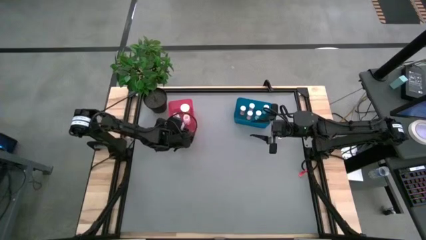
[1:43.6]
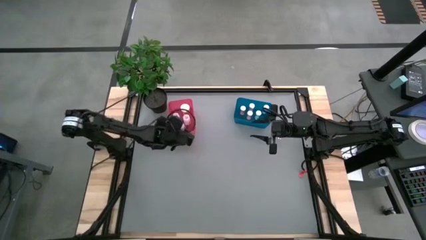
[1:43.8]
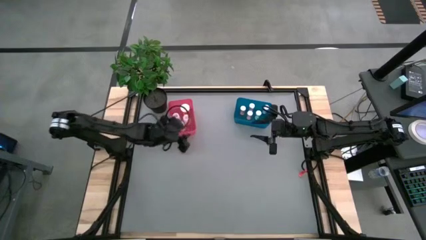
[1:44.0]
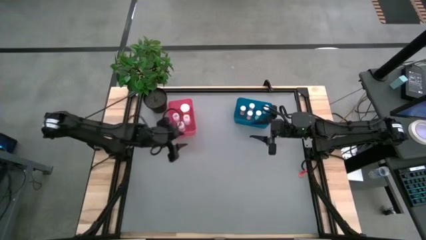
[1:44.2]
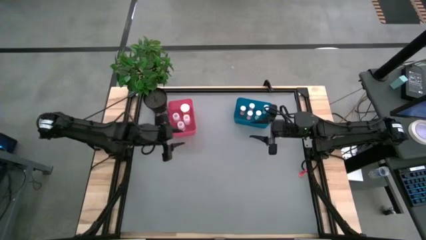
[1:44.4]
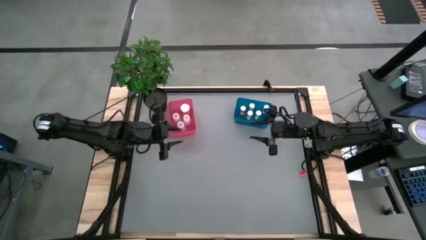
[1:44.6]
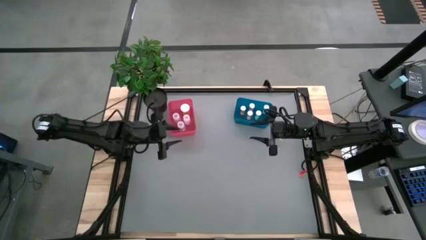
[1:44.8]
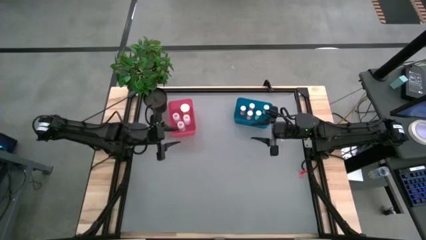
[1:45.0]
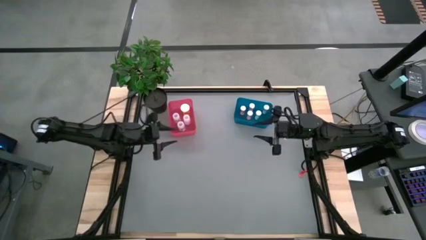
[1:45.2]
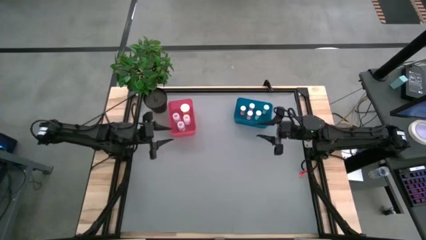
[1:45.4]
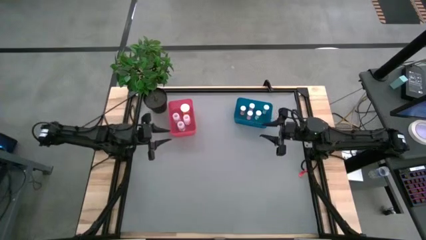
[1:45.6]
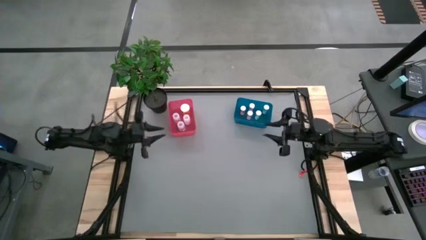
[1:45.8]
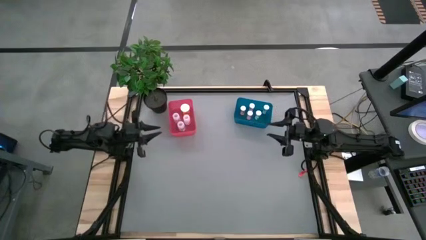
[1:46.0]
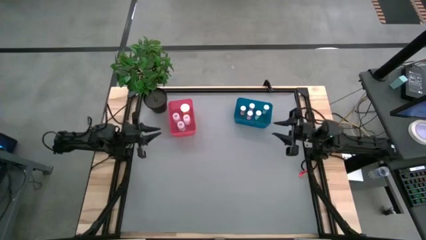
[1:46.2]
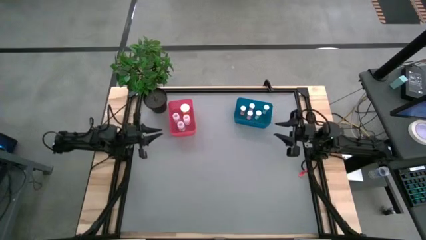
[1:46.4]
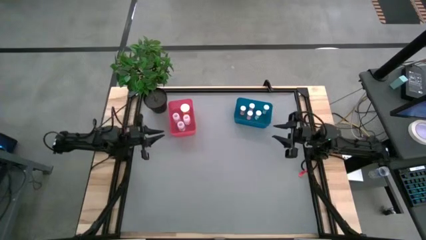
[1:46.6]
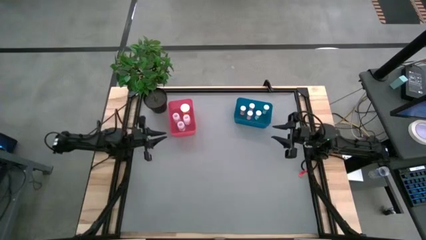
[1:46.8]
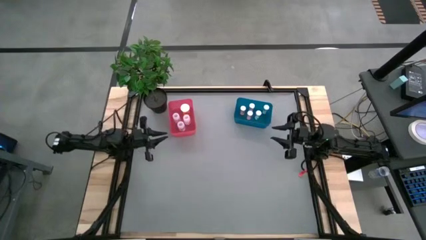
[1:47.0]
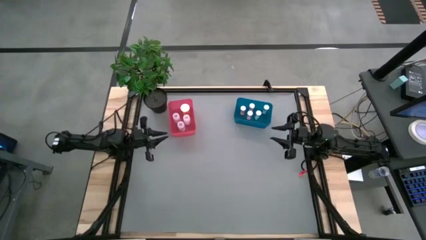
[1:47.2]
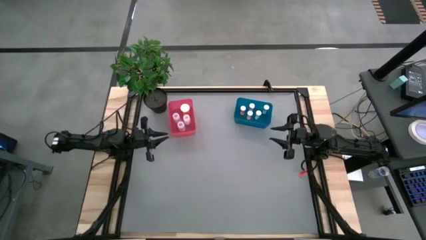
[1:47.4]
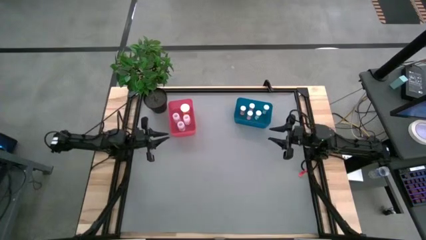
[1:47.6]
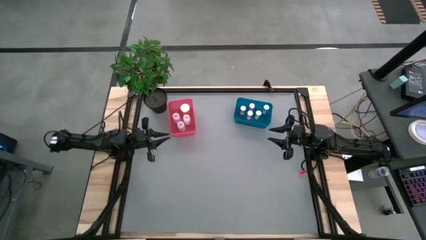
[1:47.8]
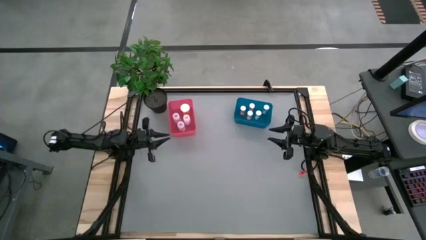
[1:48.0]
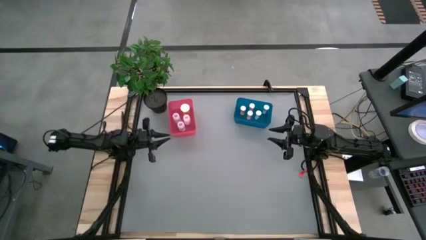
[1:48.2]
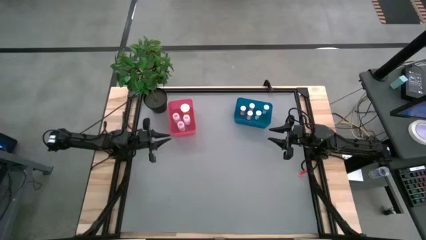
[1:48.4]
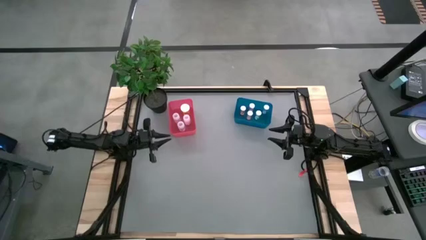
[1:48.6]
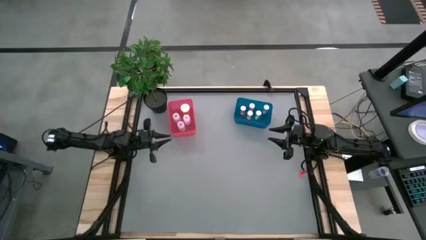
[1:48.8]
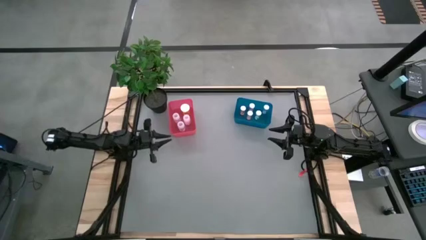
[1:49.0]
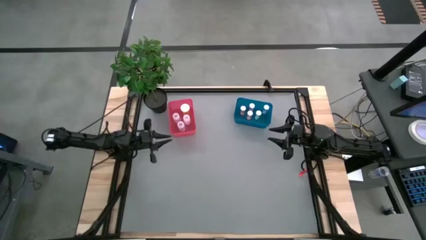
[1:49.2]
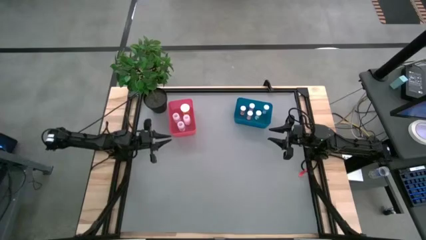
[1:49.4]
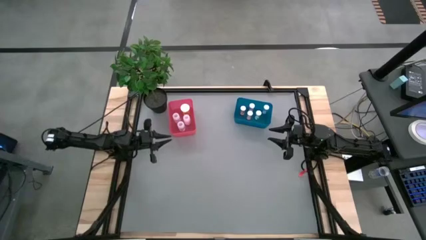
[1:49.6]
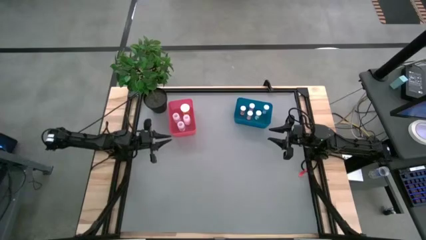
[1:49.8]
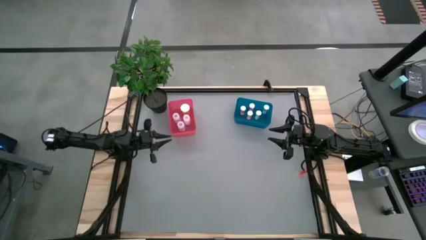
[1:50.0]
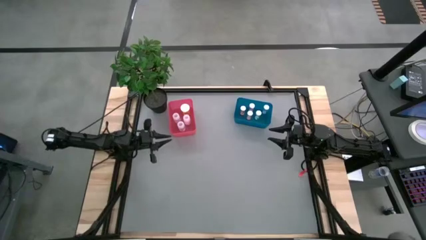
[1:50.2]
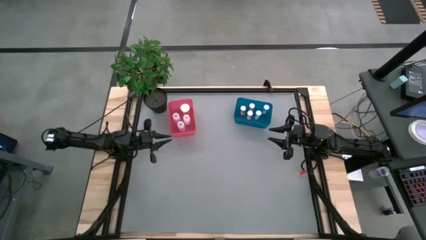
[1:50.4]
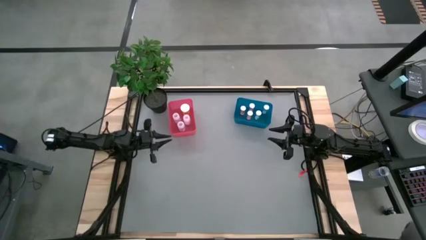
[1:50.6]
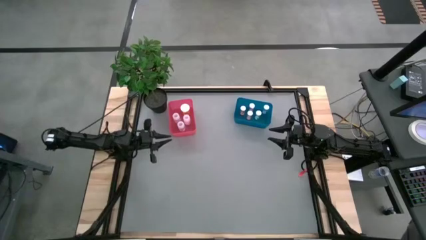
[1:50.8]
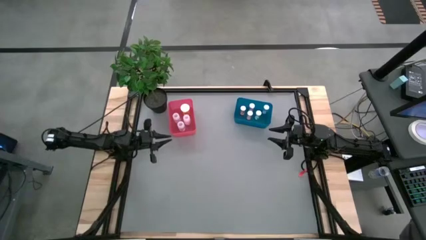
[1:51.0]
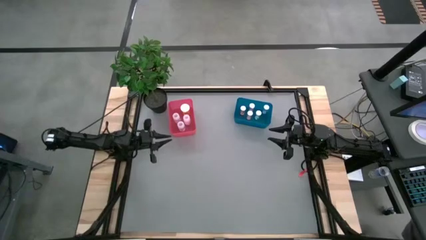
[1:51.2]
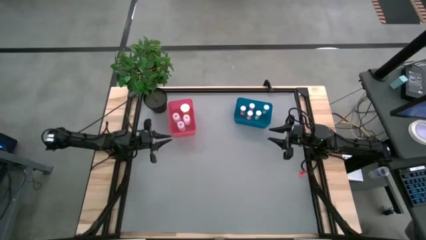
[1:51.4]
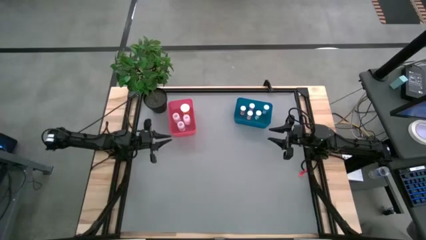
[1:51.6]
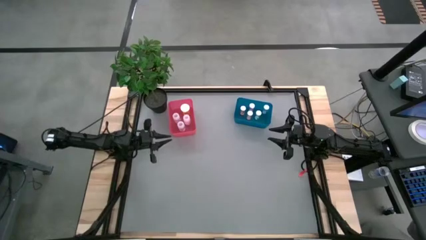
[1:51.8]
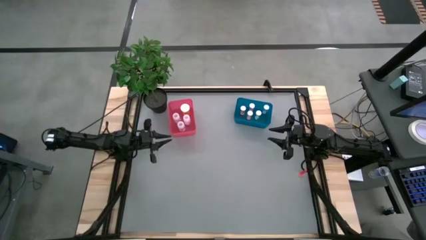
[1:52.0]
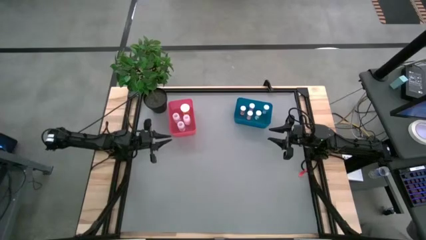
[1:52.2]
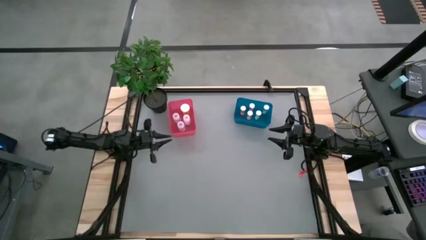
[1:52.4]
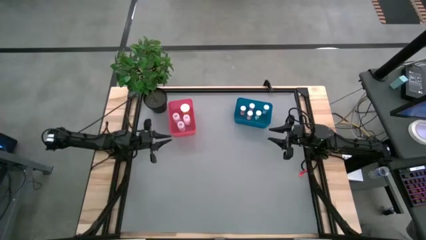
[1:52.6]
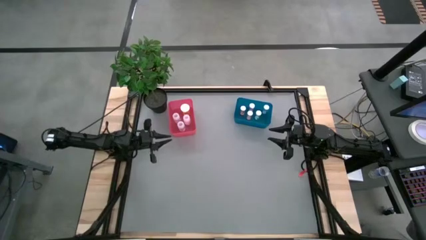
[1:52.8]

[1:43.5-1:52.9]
Task: Pick and place medicine bottles into bin by pill shape (circle, oval)
Return to Home Position

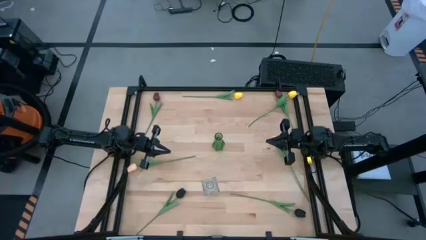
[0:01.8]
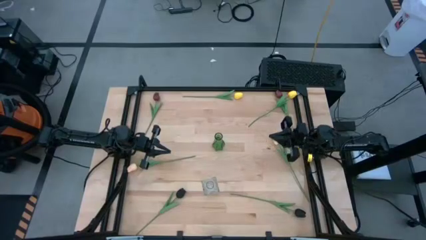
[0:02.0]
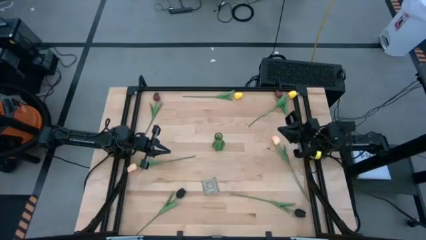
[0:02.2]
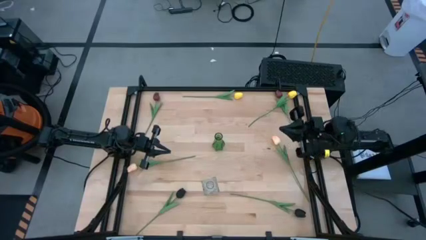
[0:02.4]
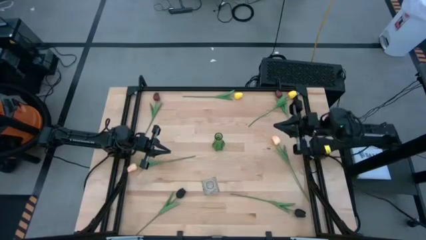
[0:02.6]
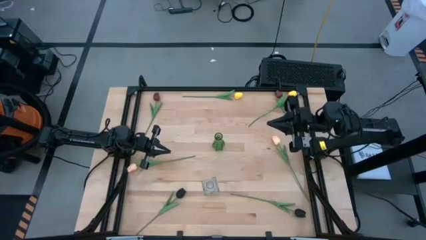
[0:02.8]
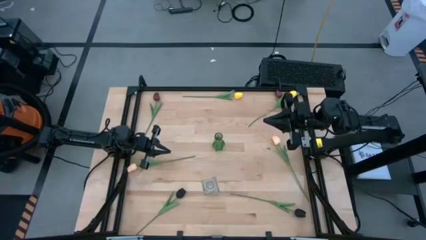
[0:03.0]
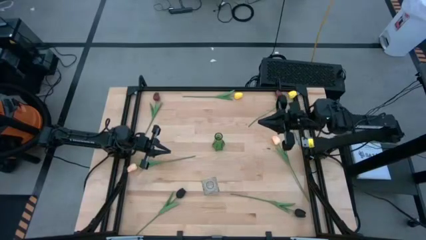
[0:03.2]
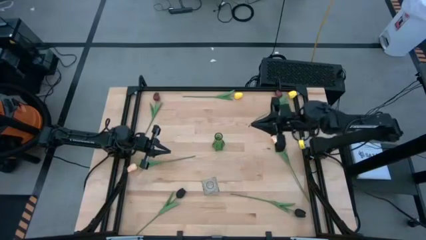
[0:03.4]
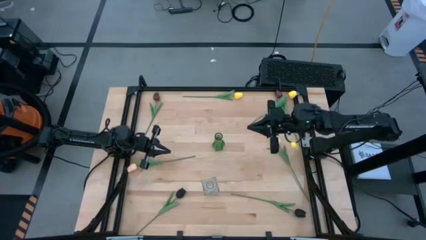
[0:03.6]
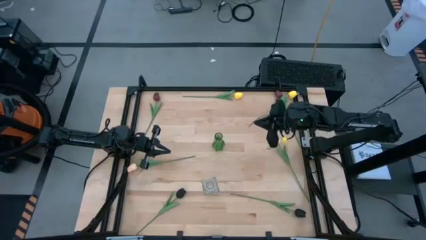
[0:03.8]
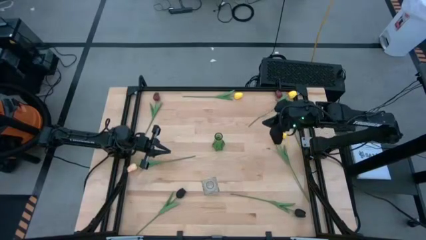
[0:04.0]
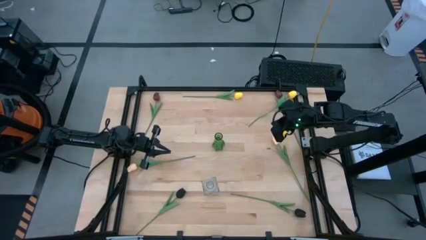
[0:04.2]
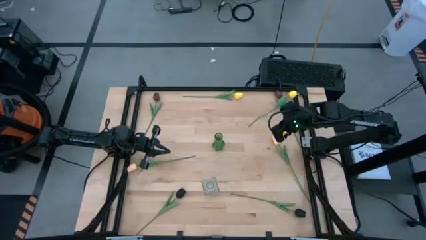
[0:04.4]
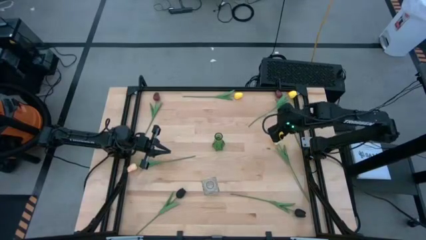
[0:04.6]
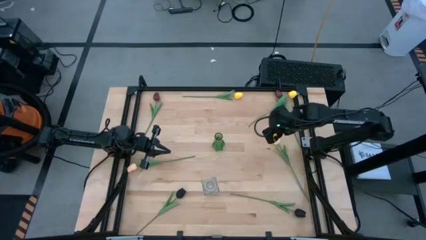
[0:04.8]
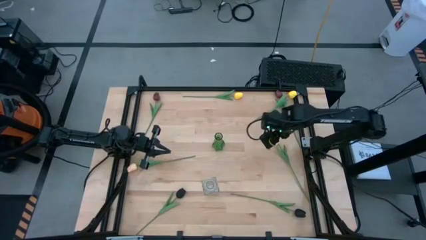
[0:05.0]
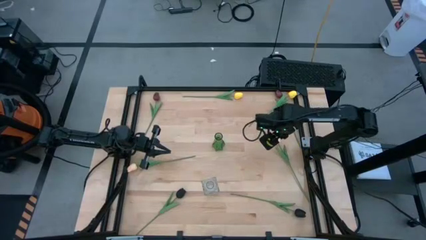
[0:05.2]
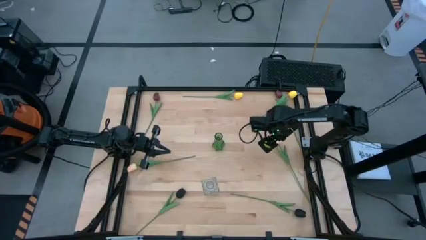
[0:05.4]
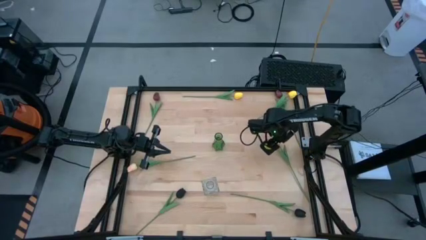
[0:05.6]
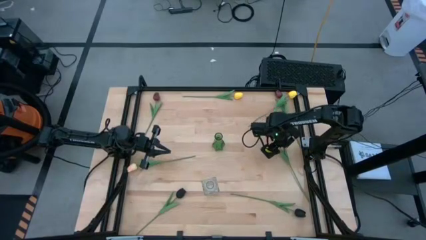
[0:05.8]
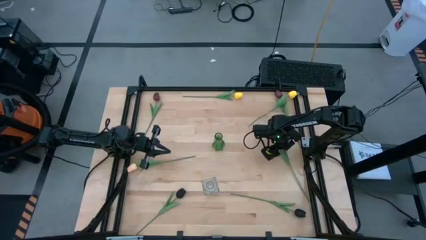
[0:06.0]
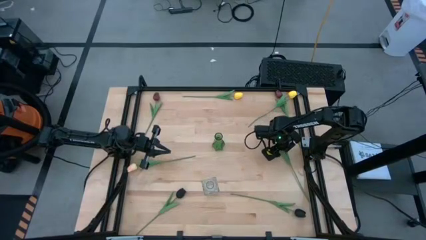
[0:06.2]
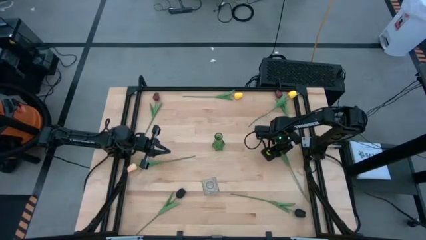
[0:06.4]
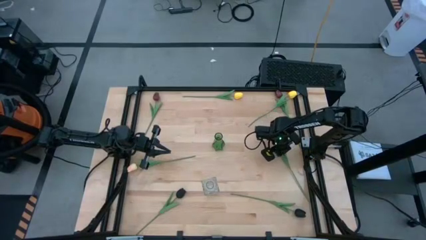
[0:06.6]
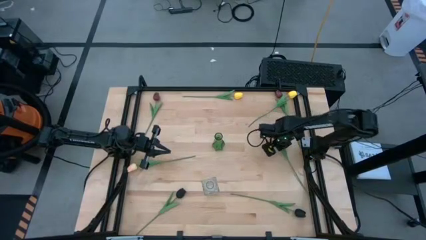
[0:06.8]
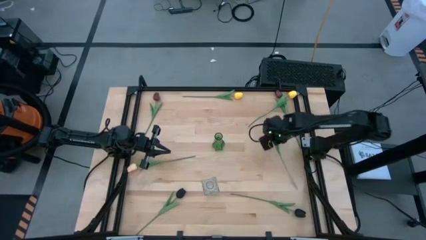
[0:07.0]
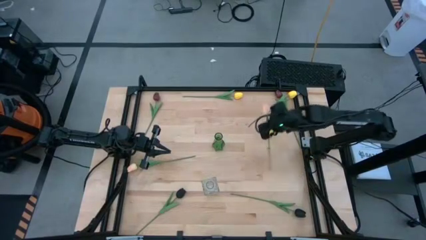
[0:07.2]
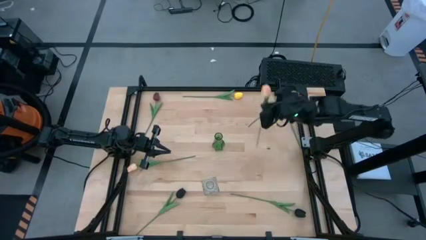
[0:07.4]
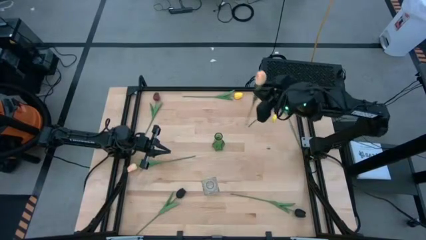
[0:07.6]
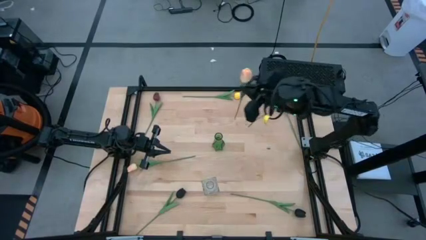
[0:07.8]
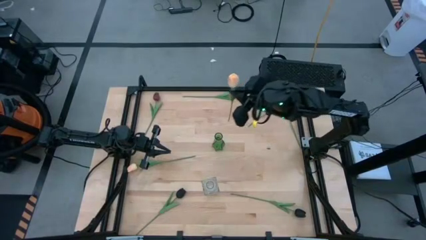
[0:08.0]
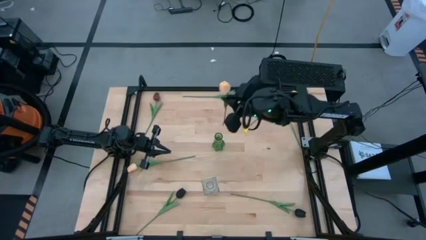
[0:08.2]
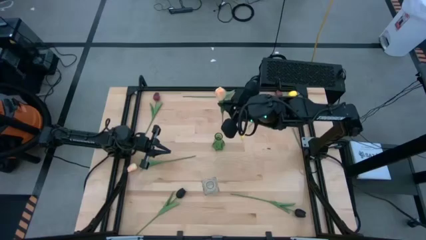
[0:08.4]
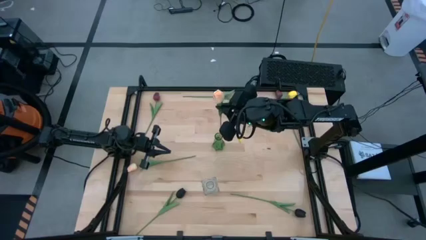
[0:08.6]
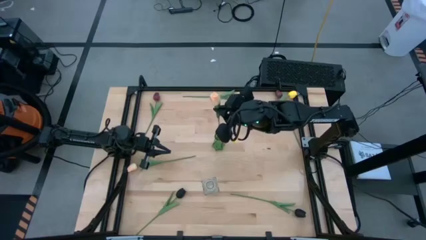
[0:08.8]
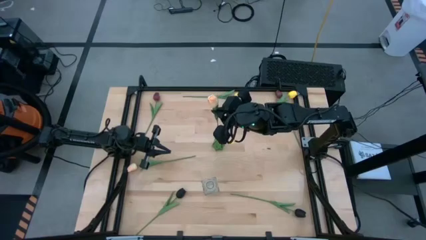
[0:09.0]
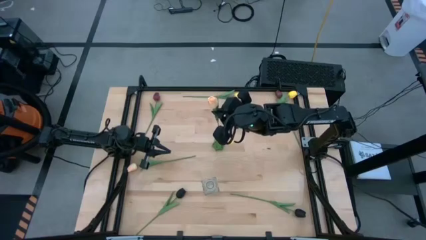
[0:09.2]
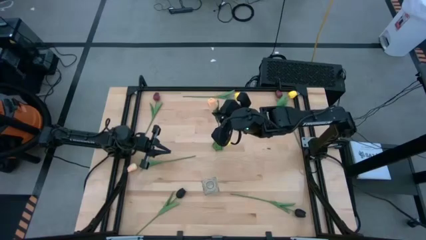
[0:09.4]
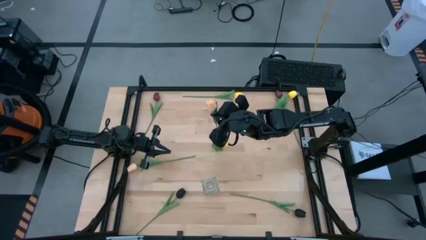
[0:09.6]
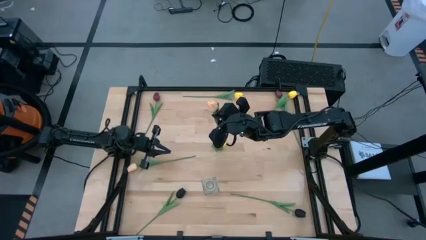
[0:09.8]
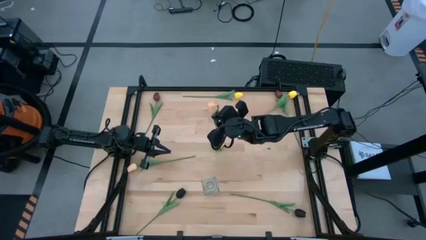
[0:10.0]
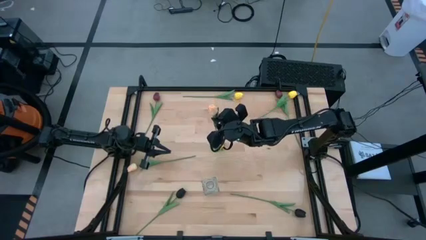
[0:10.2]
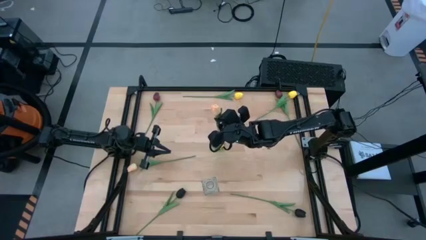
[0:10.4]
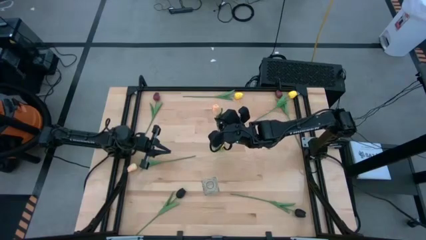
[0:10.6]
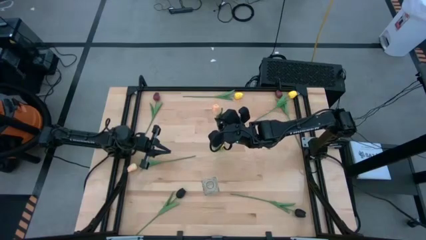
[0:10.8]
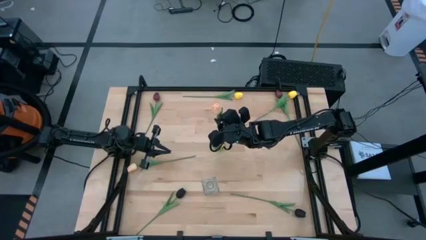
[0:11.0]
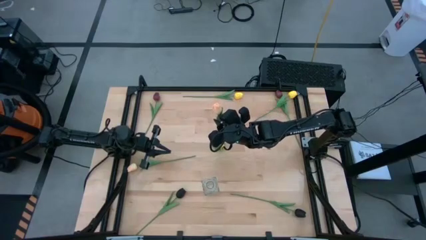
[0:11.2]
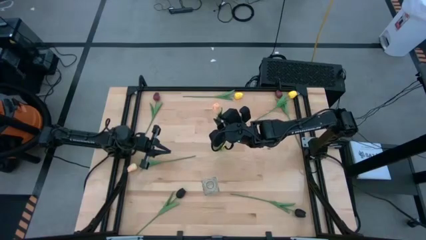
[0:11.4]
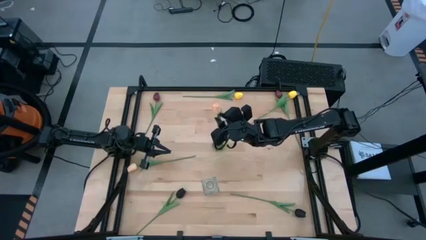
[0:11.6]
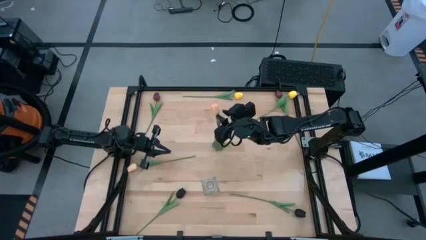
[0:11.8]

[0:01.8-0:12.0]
Task: Sort flowers into vase by color
Put the right white flower into the green vase
